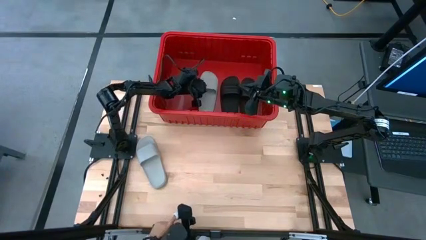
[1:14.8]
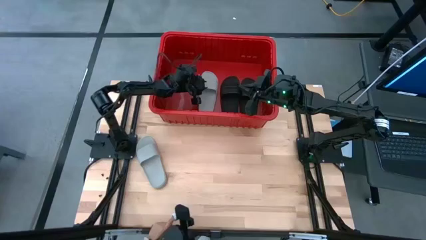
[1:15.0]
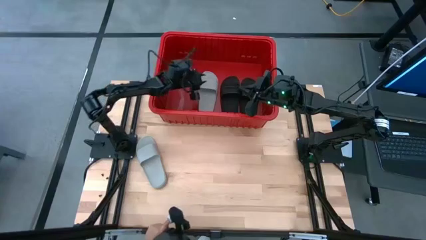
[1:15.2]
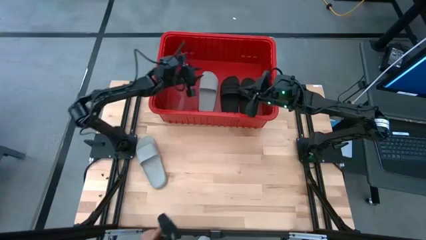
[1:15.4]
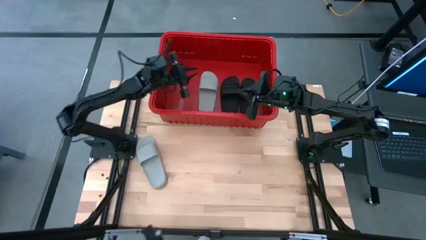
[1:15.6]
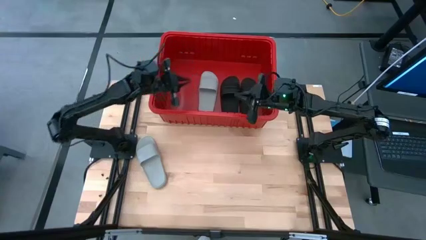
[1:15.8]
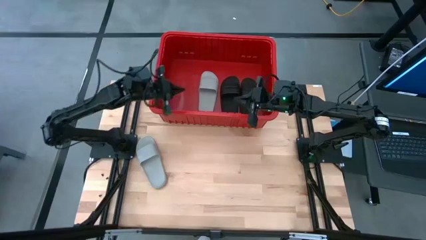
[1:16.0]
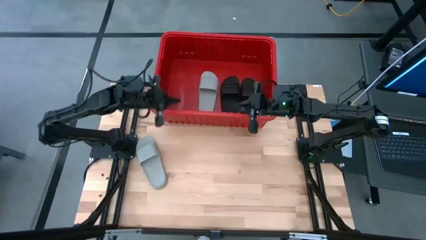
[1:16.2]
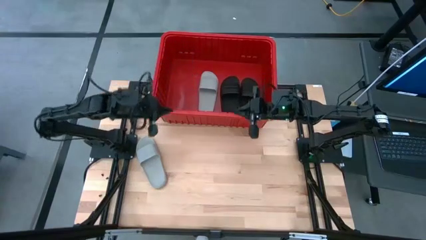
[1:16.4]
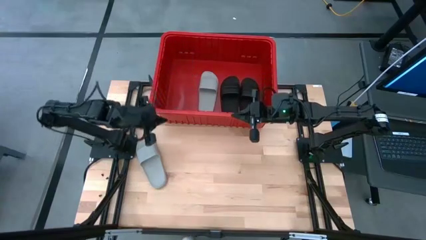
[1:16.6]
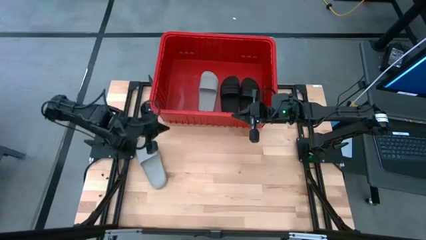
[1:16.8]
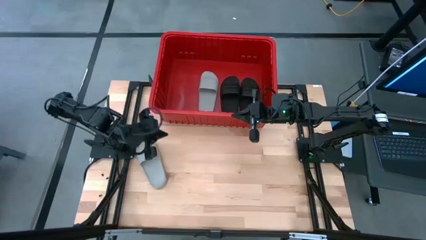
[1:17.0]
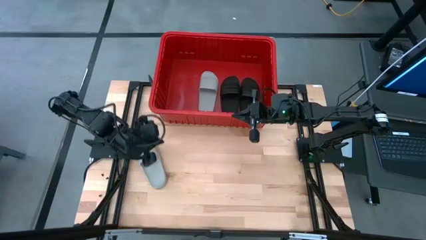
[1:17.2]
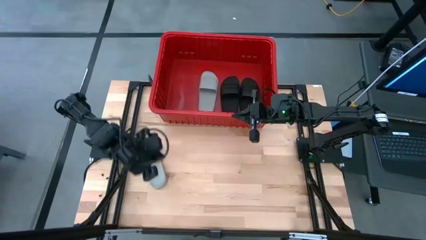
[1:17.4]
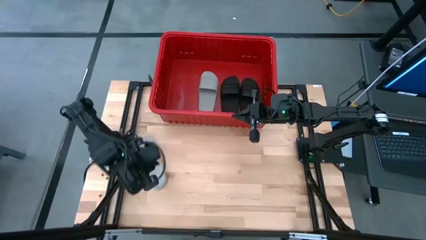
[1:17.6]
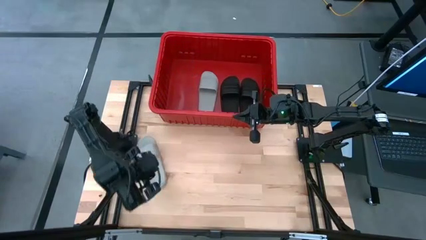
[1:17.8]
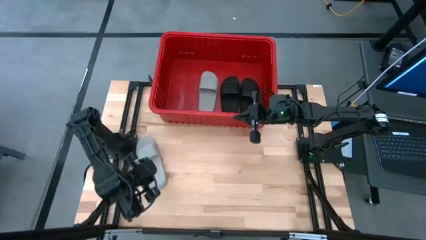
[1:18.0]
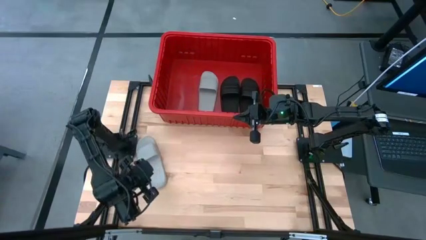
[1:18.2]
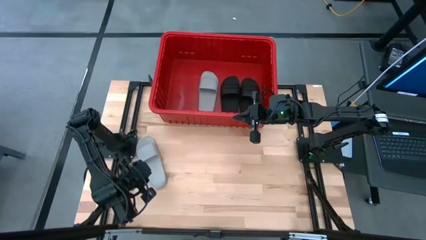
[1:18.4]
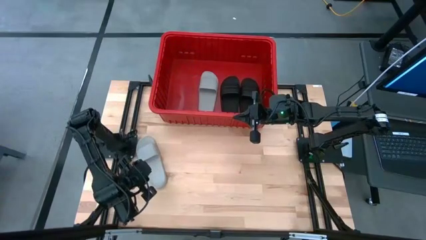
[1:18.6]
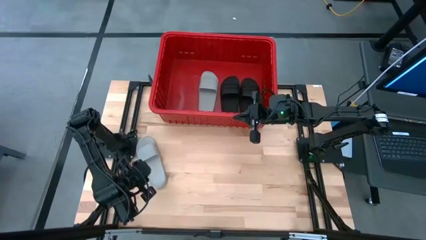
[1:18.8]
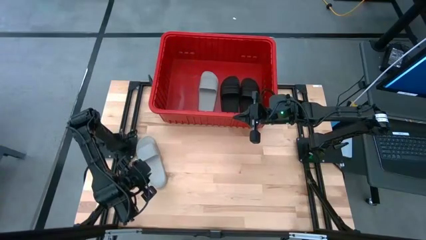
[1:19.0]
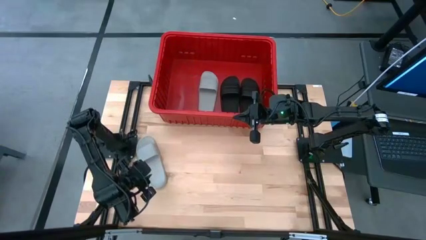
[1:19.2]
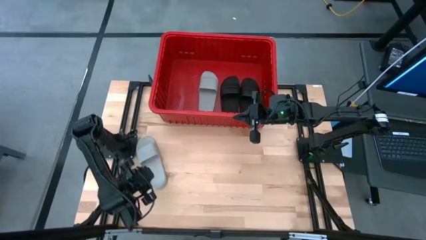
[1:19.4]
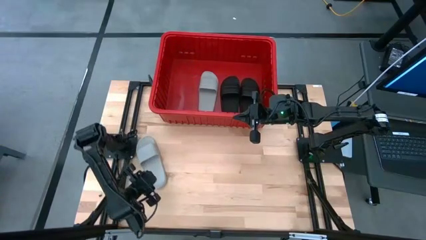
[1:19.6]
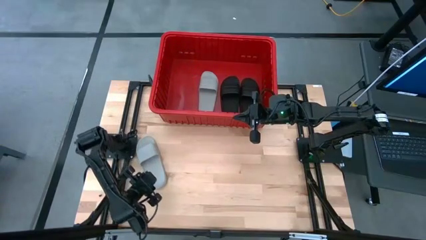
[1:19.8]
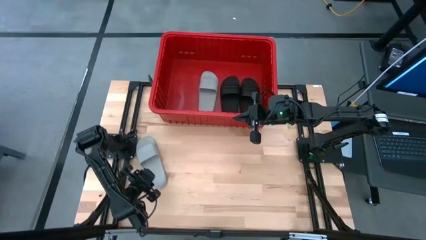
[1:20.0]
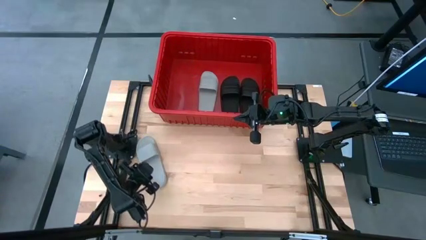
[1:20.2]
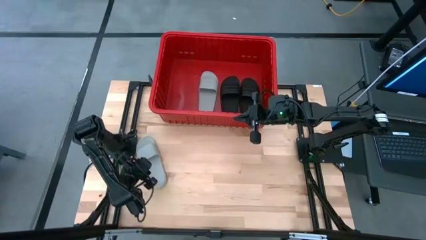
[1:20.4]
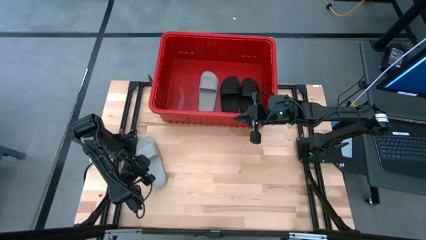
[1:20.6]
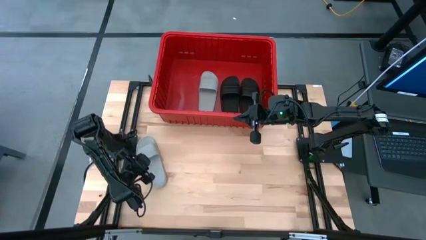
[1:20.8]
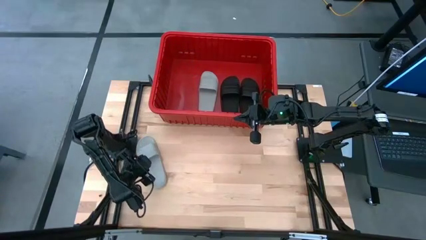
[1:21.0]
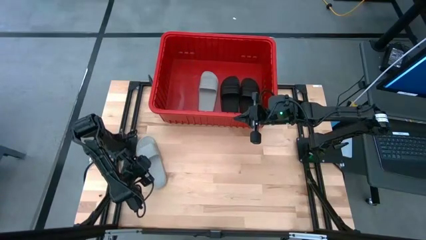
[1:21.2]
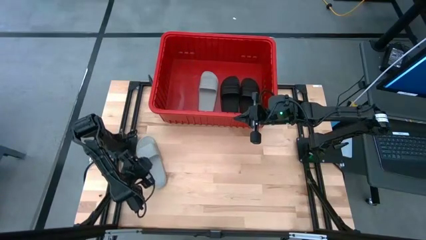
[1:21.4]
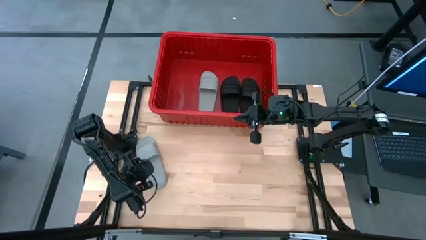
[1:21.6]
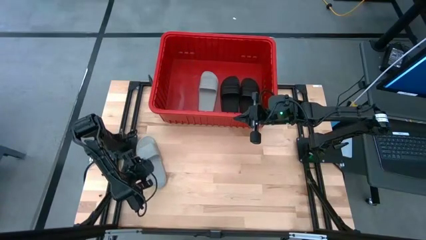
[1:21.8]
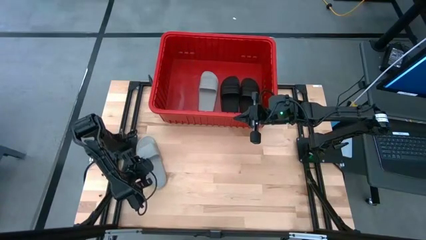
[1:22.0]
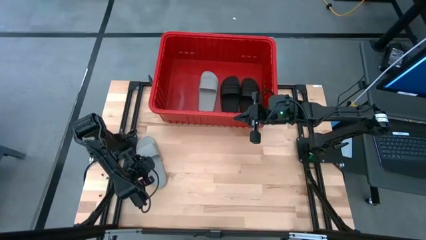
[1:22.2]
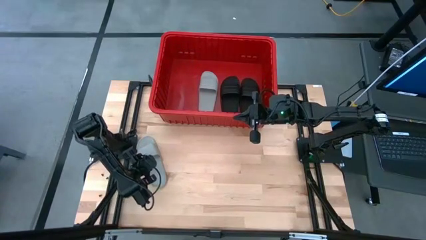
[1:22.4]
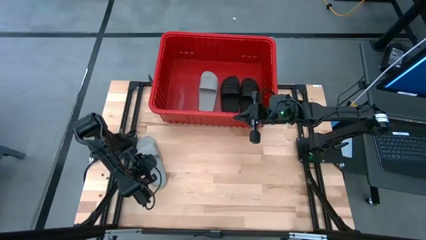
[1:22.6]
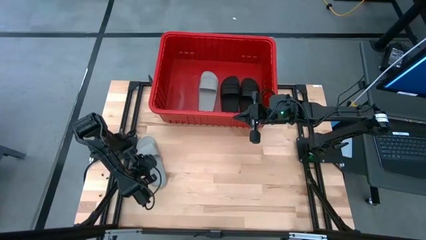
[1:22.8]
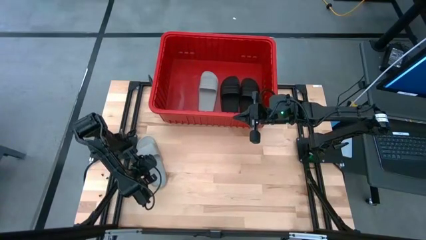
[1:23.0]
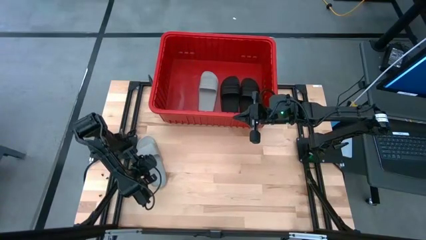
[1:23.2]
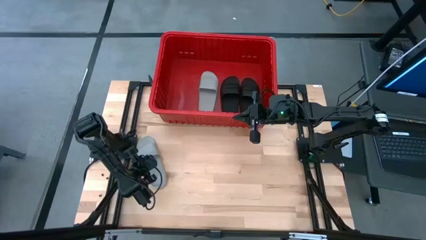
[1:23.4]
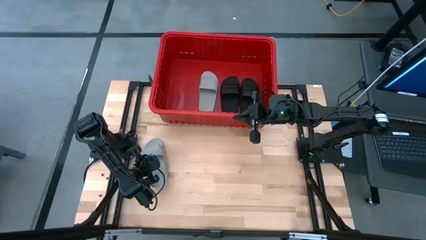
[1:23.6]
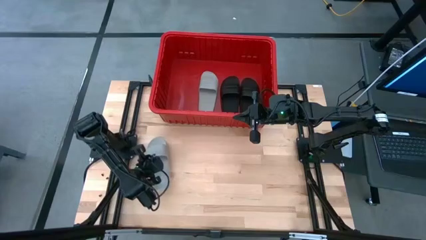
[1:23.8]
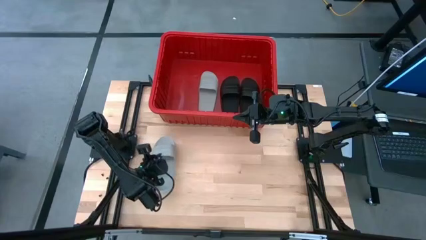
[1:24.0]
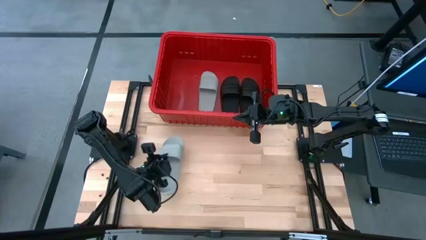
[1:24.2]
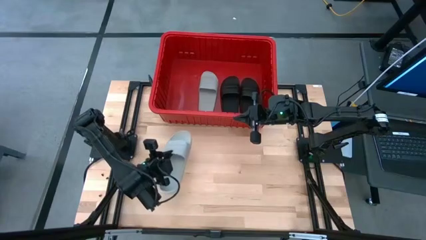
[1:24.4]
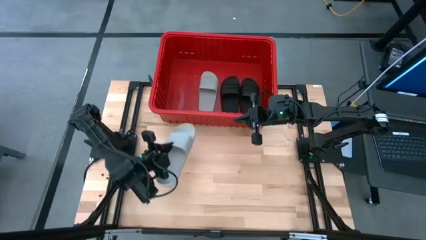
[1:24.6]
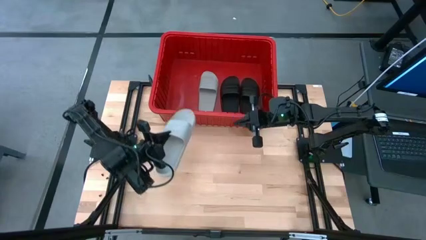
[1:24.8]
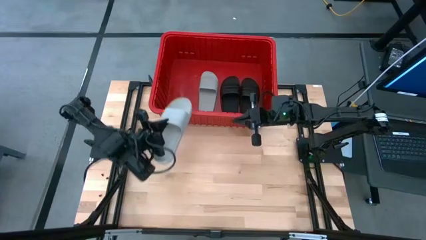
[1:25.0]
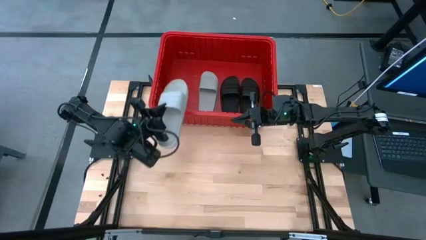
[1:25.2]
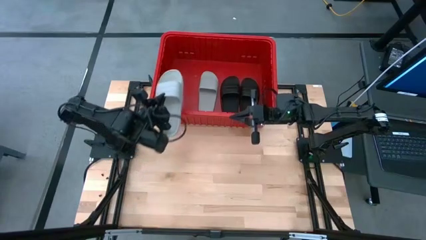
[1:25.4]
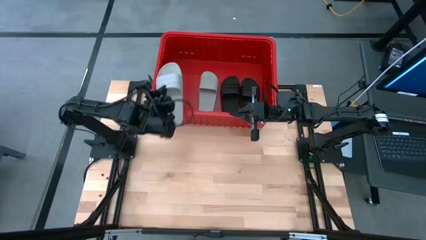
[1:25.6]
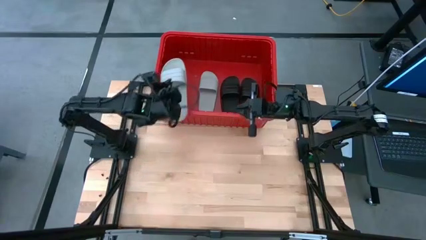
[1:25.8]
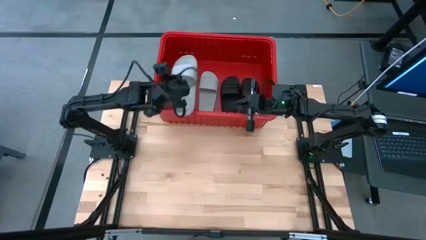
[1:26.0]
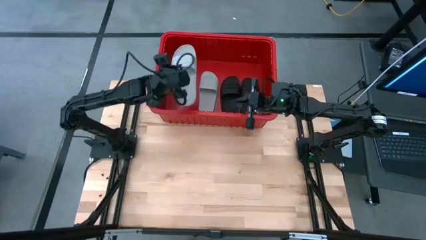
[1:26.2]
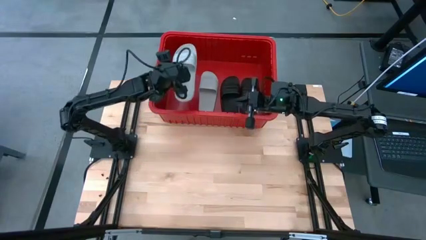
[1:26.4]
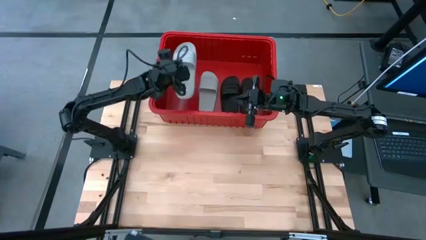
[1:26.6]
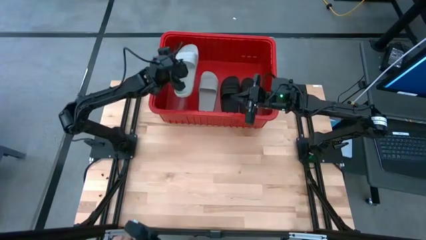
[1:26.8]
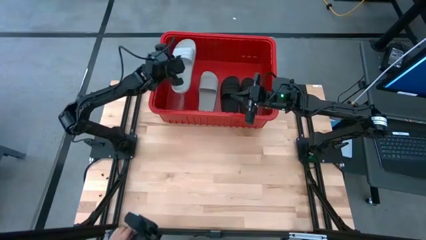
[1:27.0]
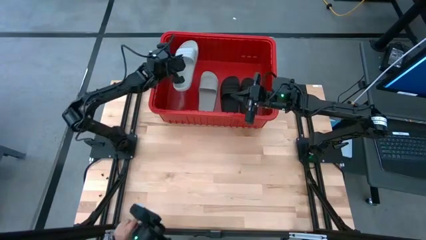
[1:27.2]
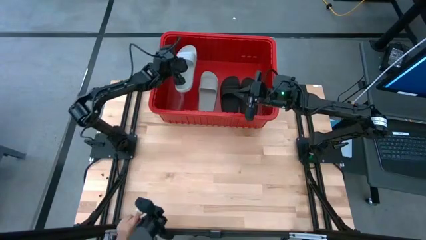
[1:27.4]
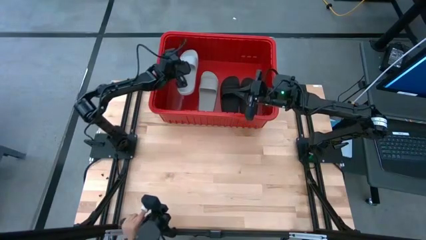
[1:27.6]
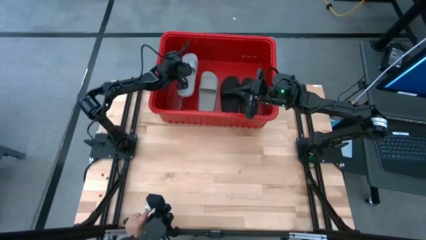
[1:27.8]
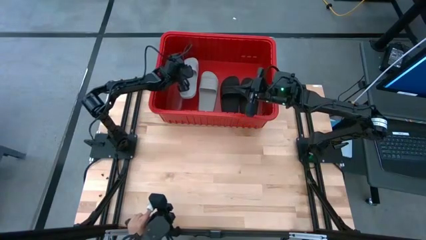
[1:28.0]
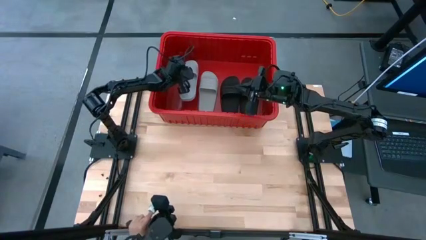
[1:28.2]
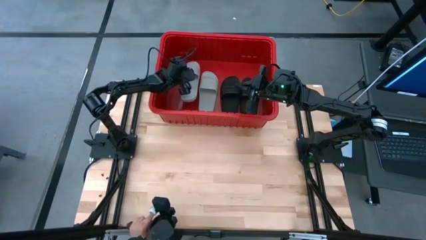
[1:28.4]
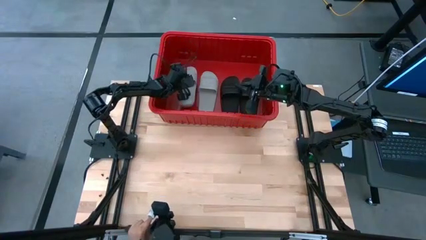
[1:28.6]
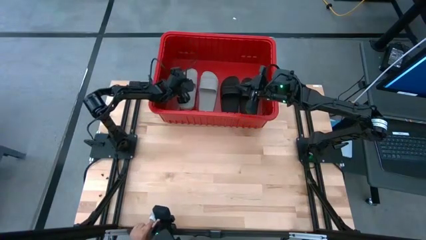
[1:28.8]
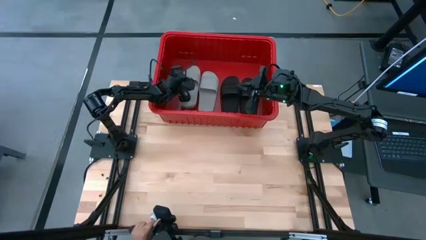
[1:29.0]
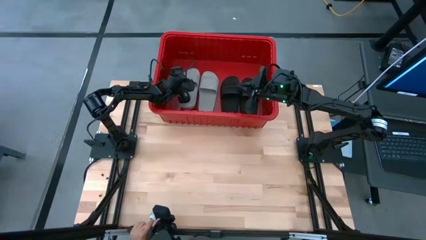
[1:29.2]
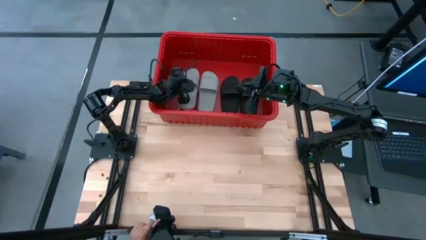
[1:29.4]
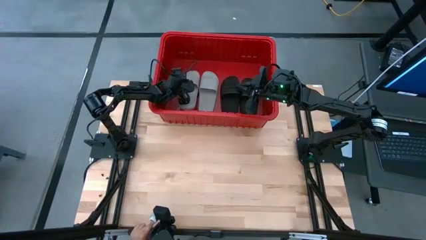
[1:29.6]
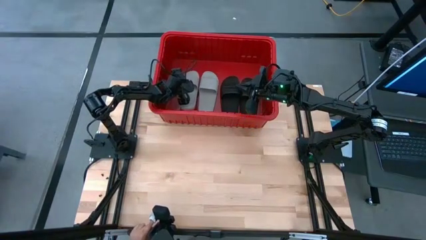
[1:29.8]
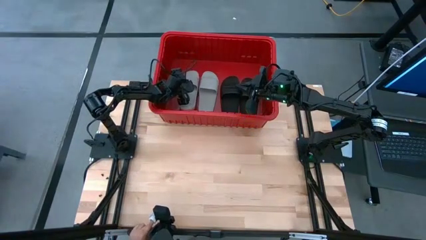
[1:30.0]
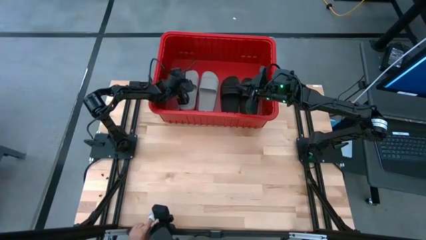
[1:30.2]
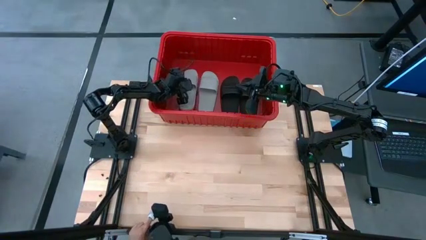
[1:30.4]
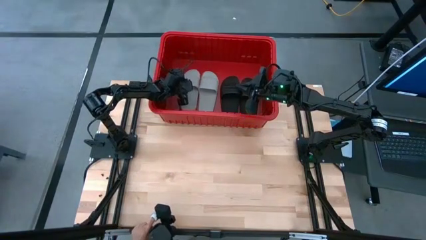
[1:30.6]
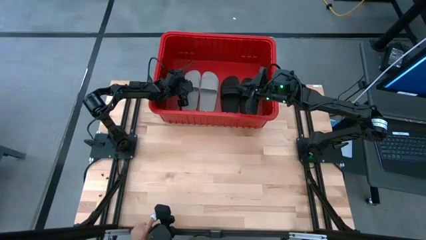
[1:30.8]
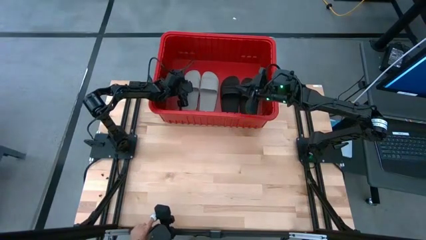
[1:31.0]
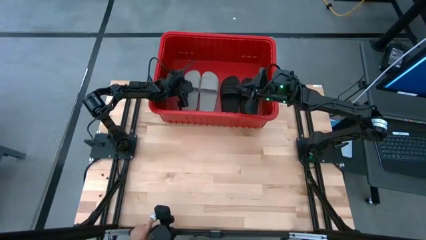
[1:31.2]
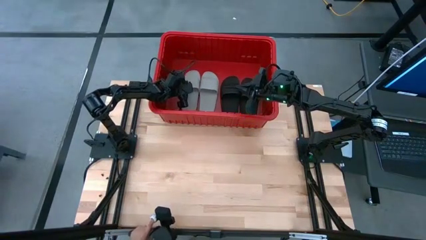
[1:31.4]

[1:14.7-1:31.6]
Task: Pick and place slides into bin
Put the gray slide into the red bin

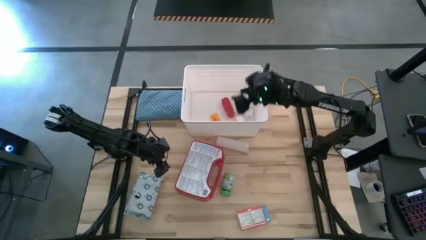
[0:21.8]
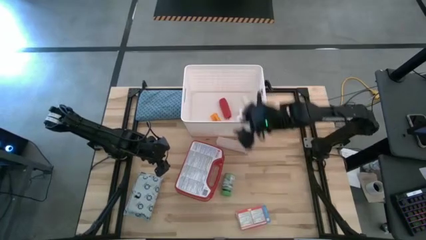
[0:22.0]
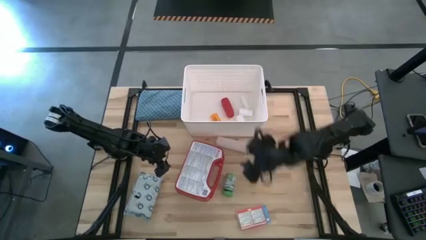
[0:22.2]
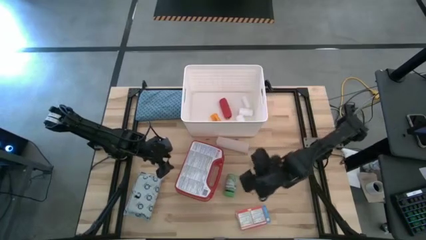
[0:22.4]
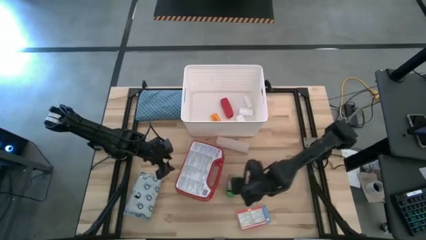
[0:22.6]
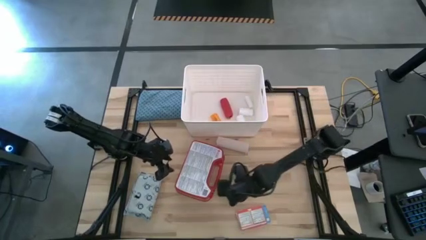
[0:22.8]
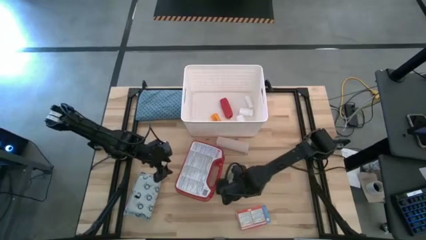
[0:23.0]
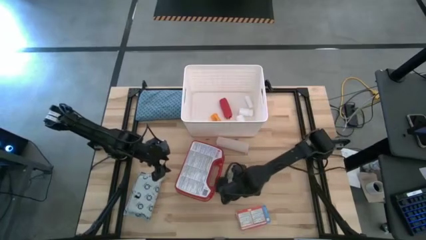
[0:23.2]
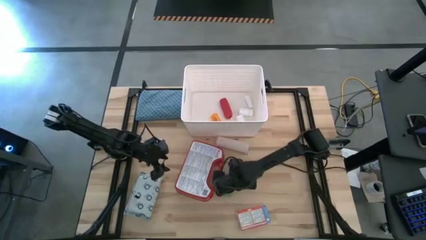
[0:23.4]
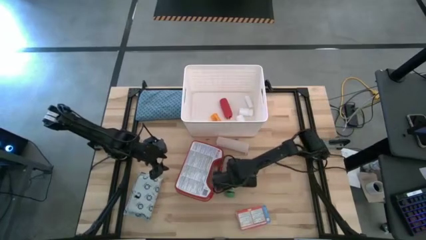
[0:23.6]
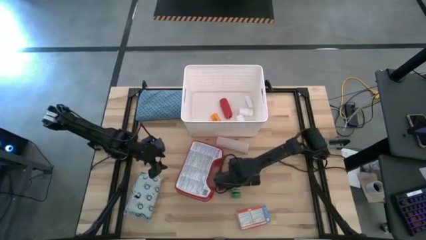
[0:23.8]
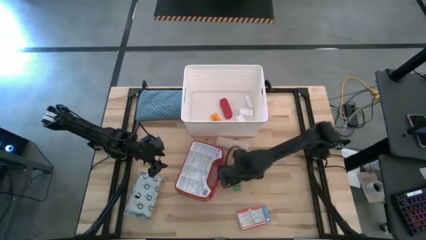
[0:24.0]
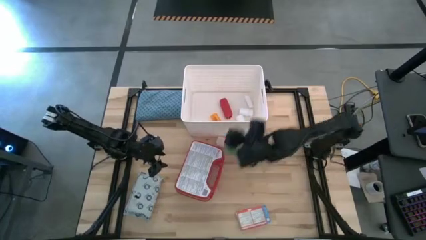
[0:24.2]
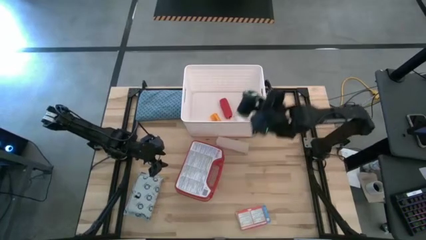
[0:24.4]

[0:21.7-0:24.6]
Task: Pick & place medical supplies in basket/bin
Put the green pill bottle into the white bin
